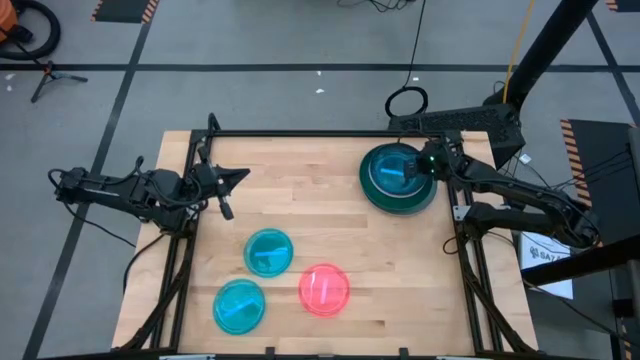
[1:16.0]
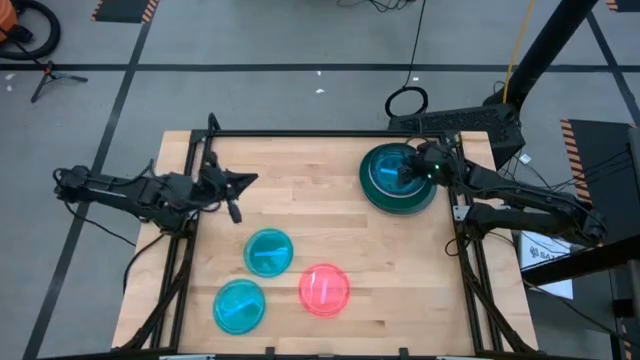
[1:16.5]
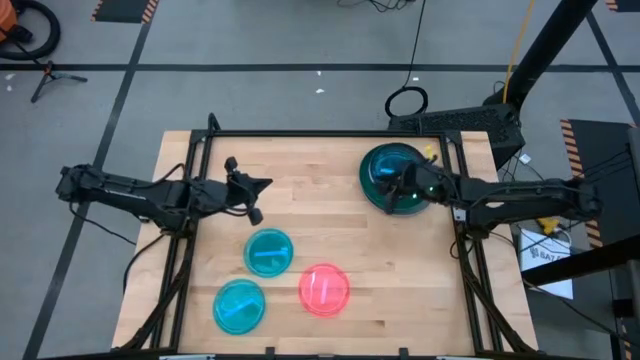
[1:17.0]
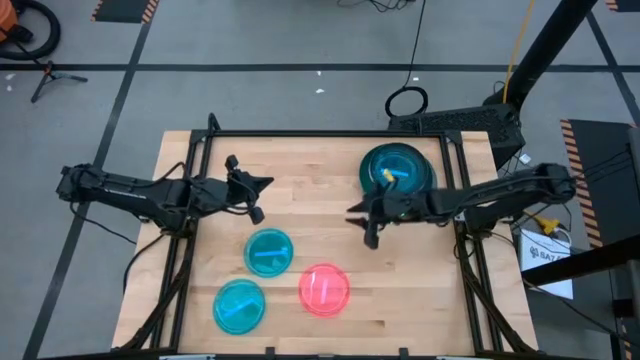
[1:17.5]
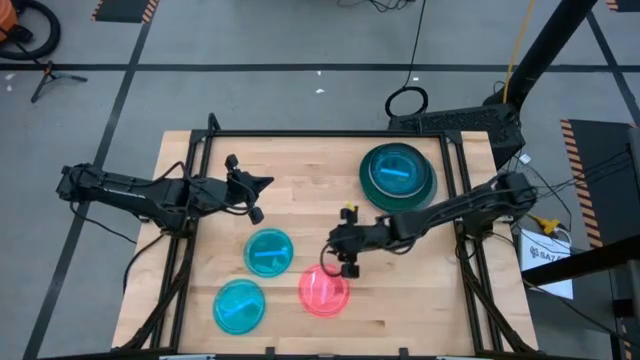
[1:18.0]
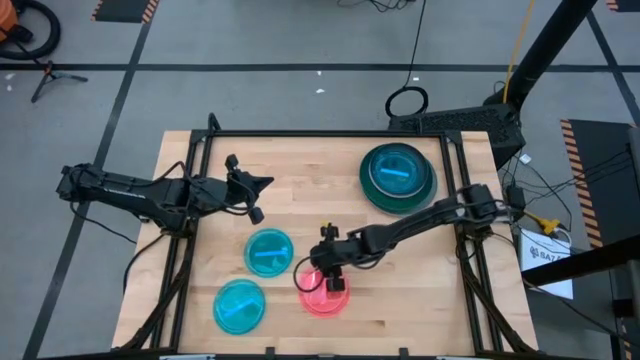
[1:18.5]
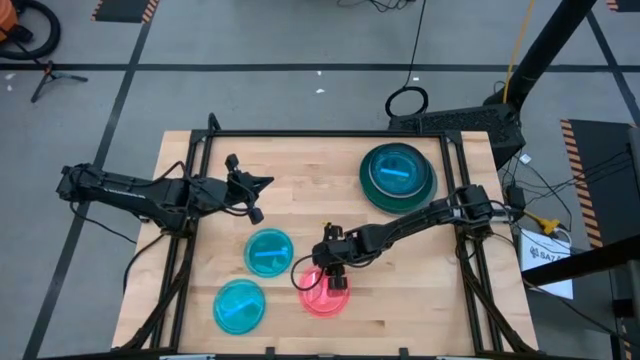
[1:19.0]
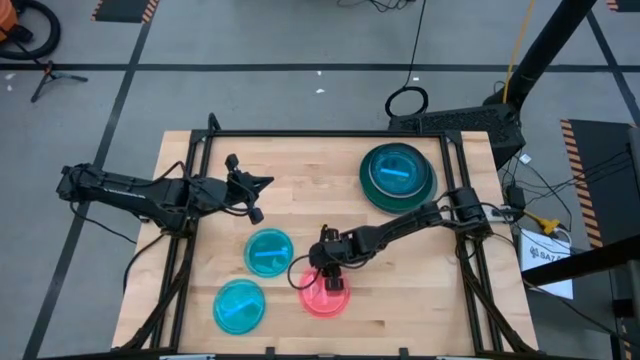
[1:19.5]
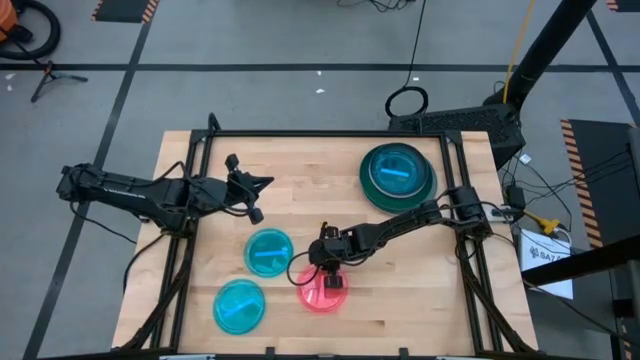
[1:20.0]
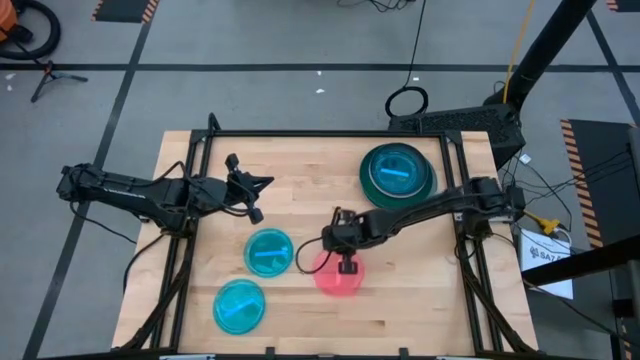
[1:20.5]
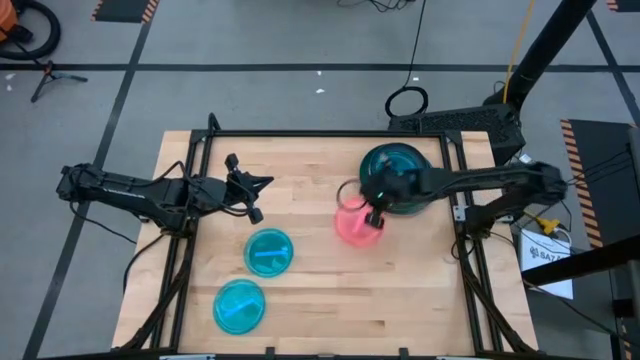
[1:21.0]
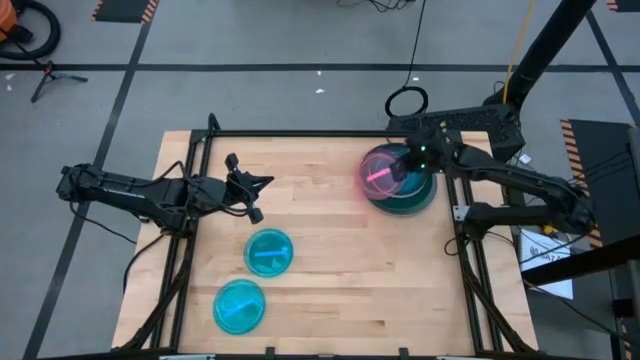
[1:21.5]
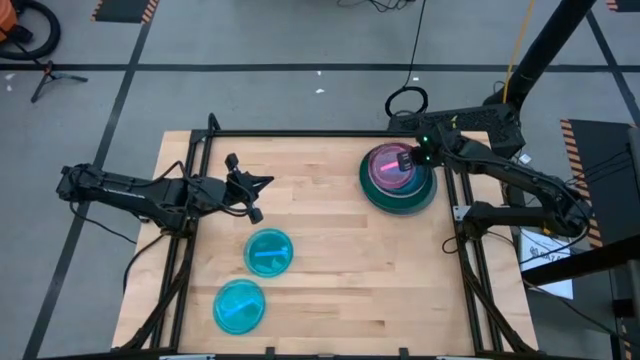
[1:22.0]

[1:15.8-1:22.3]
Task: Stack plastic plates
Stack the pink plate on the blue plate

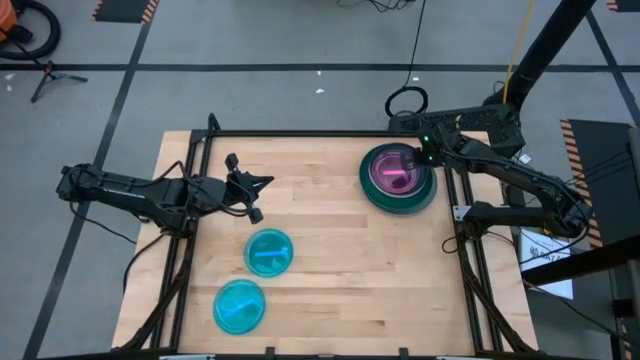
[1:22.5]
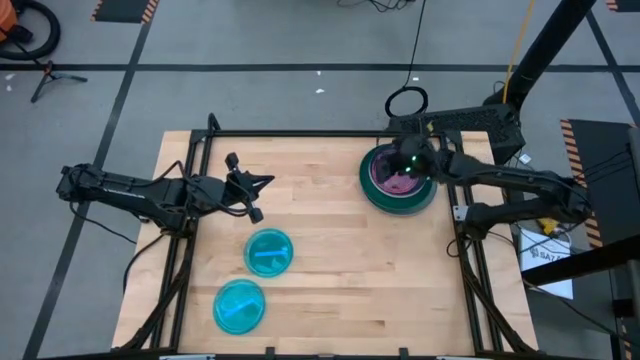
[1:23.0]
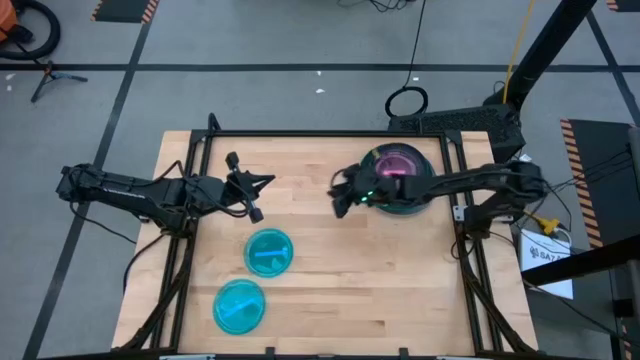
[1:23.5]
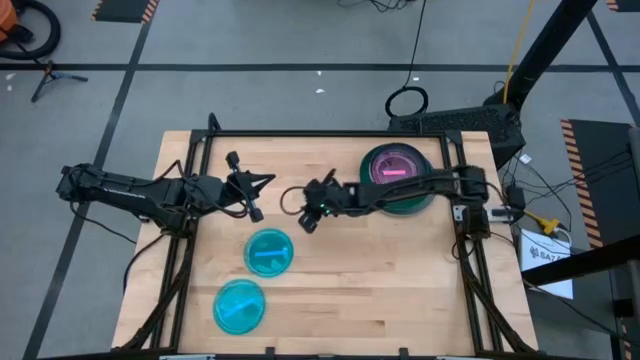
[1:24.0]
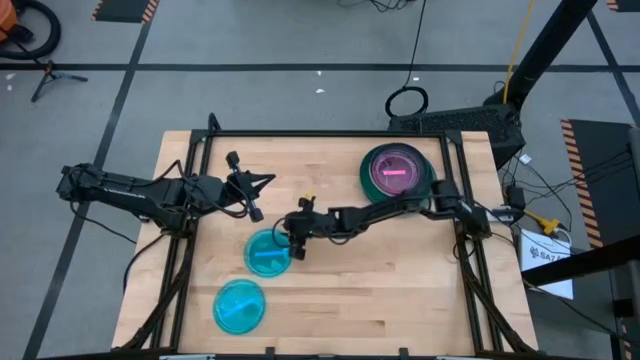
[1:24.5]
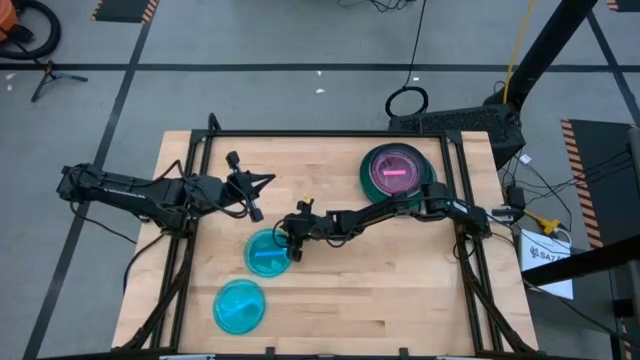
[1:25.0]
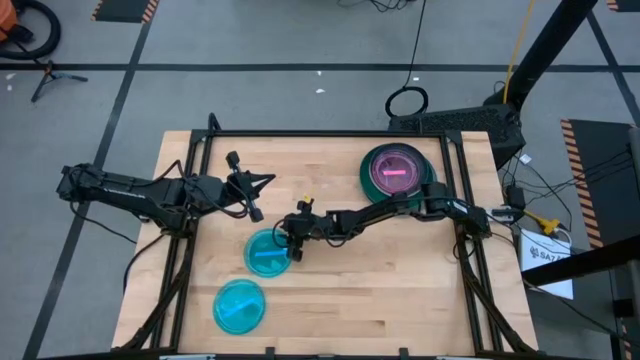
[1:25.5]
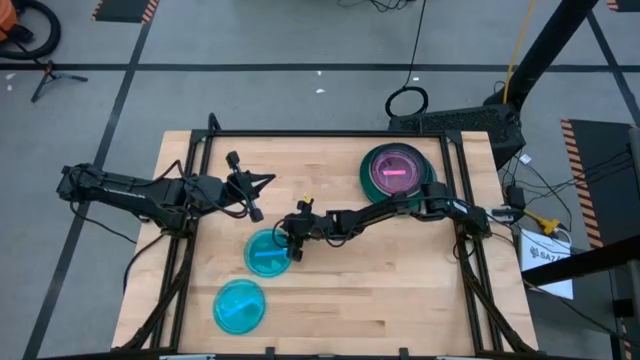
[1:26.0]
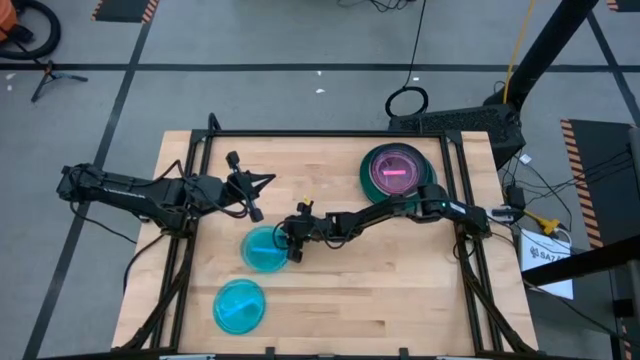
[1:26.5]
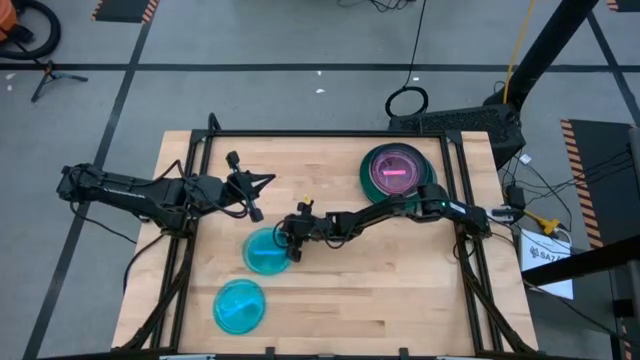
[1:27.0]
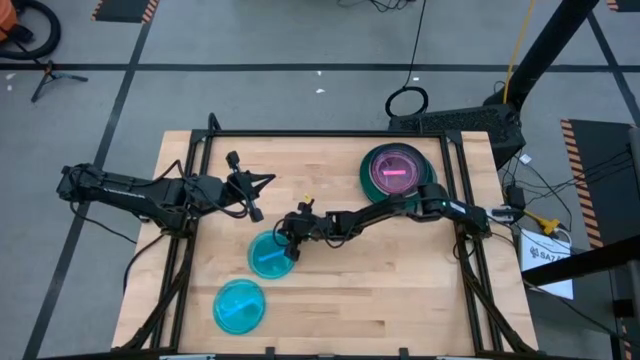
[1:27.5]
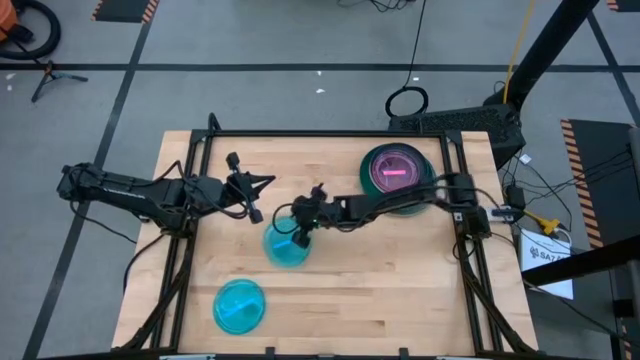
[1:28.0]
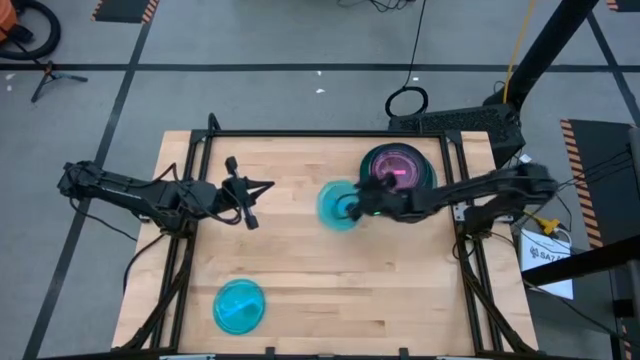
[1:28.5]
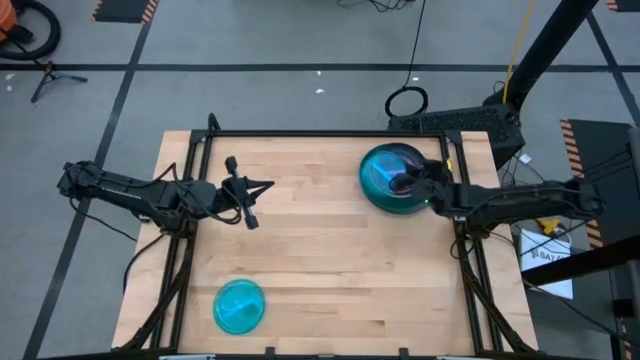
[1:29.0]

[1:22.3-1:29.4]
Stack the top blue plate on the pink plate

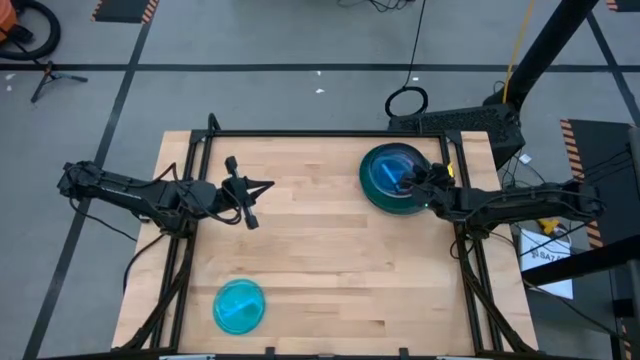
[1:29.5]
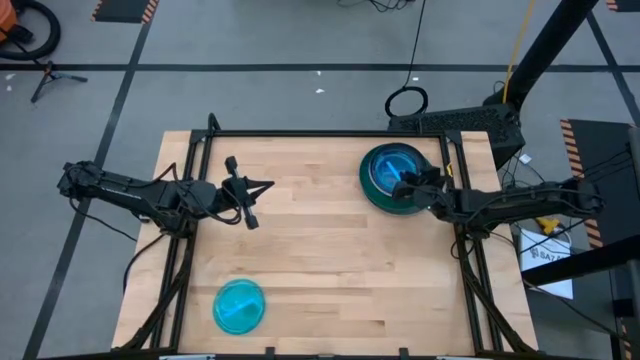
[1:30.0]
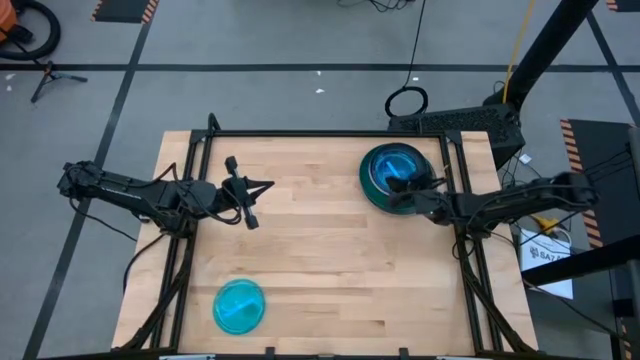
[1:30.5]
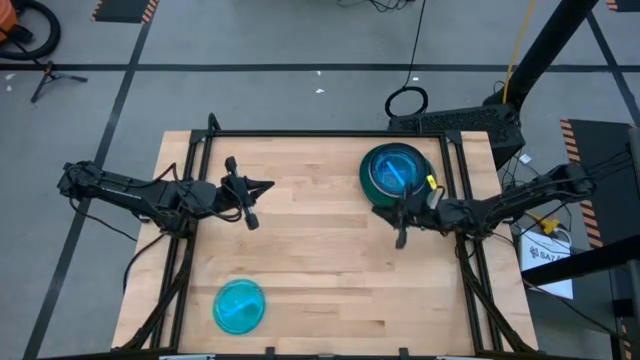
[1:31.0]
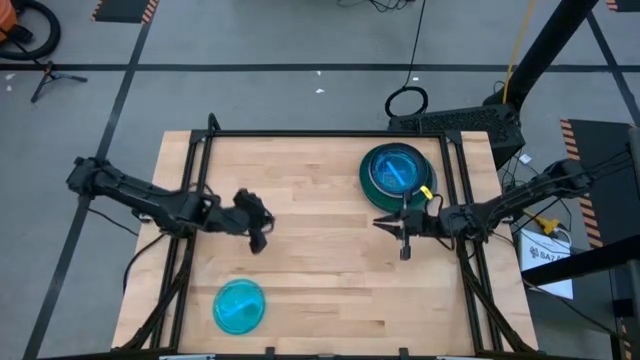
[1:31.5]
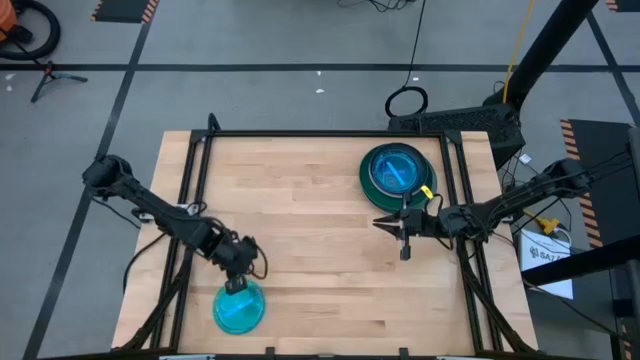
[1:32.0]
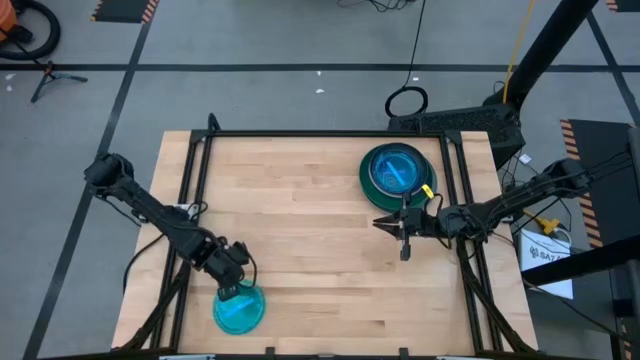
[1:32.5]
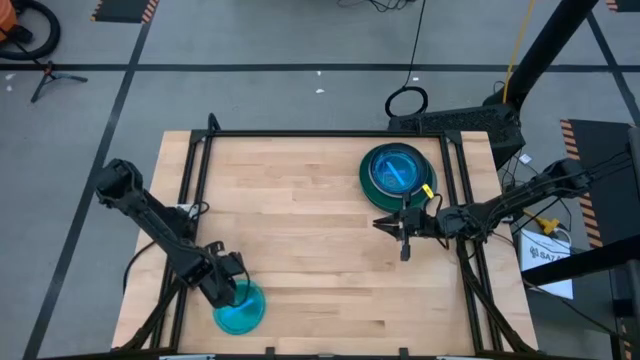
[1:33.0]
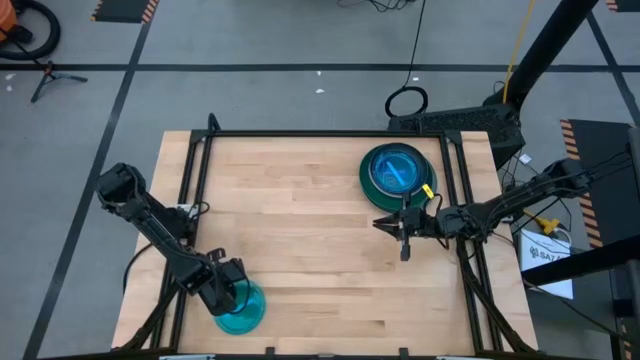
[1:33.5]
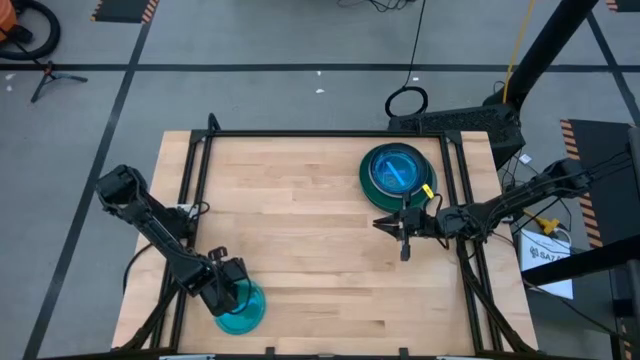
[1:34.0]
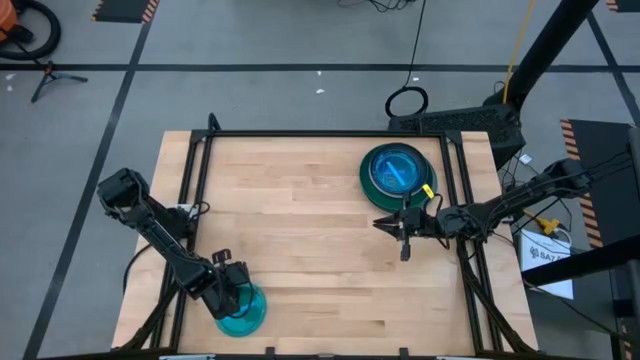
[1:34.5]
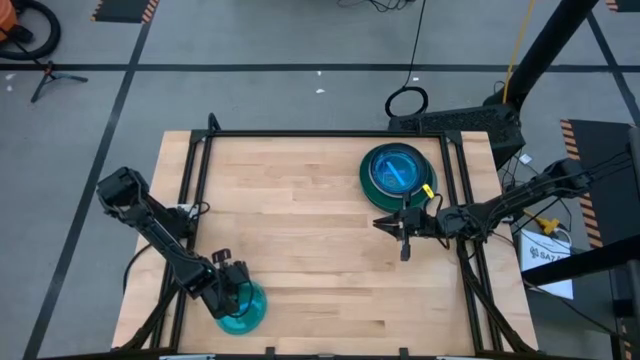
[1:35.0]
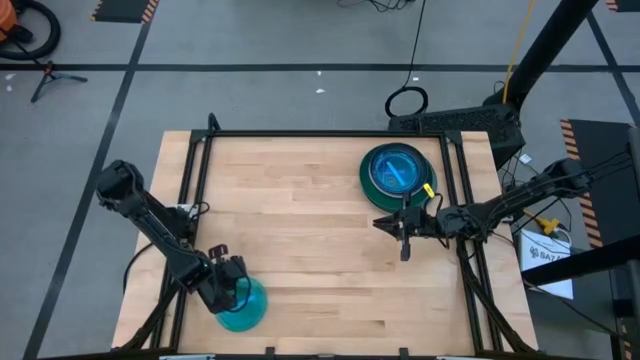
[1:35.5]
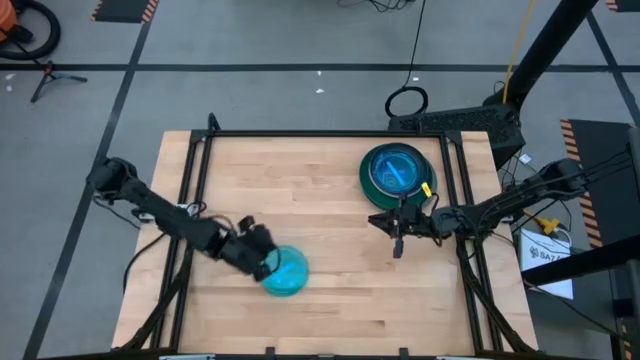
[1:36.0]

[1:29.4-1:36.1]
Stack the blue plate on the blue plate
